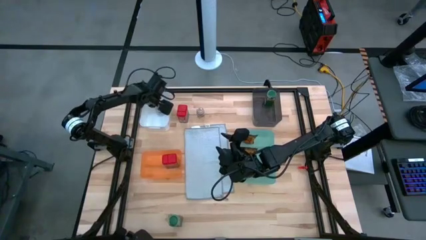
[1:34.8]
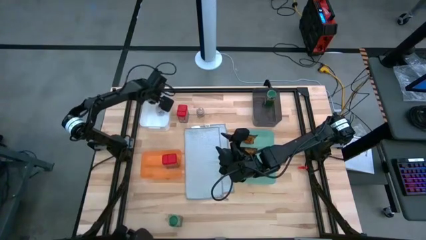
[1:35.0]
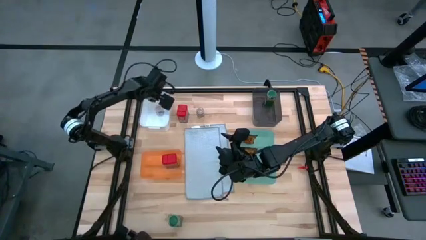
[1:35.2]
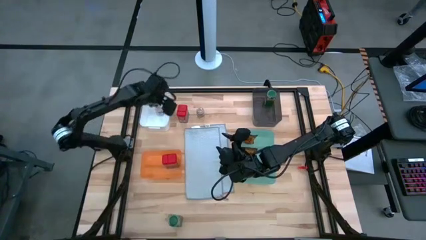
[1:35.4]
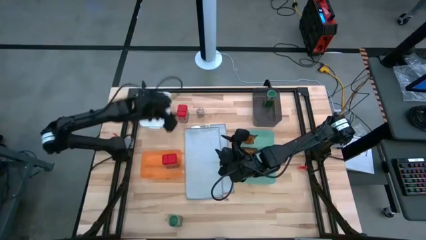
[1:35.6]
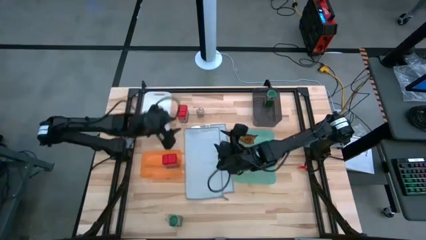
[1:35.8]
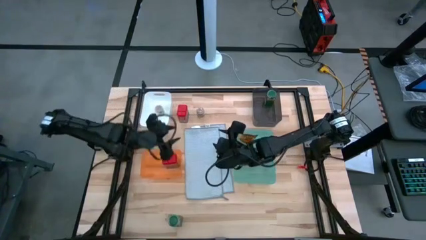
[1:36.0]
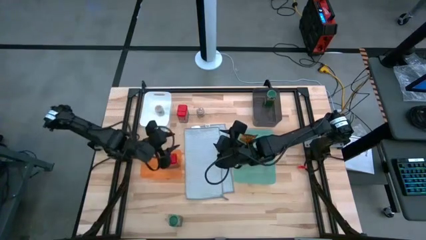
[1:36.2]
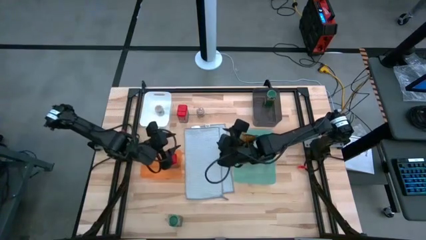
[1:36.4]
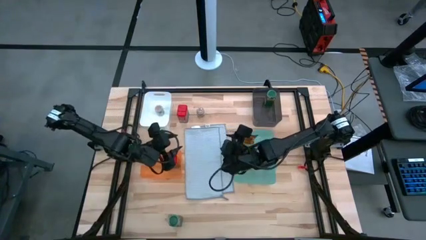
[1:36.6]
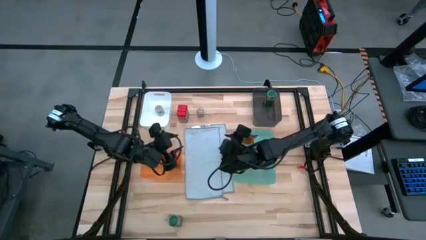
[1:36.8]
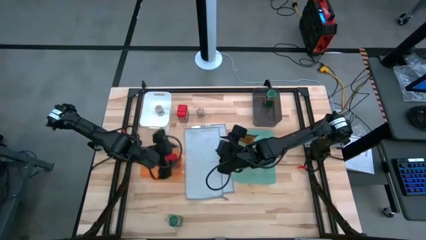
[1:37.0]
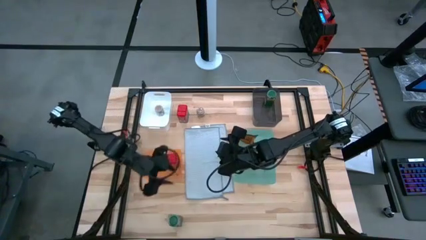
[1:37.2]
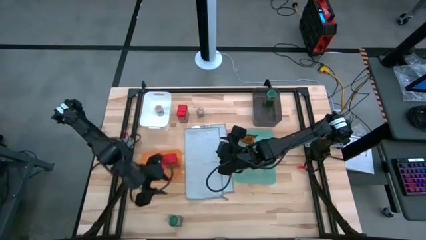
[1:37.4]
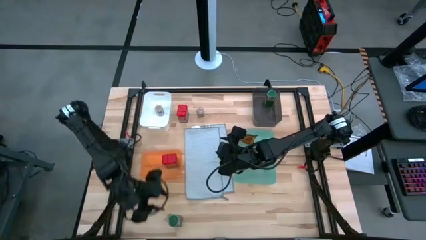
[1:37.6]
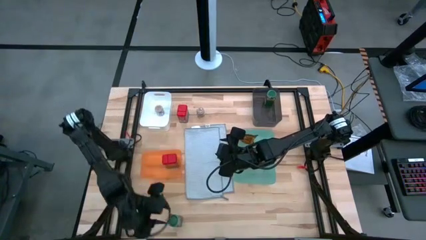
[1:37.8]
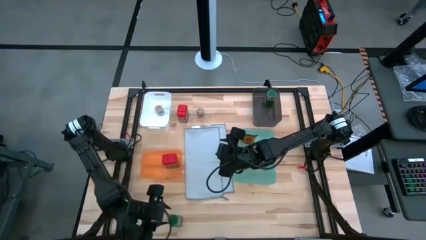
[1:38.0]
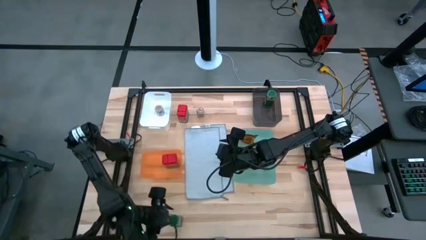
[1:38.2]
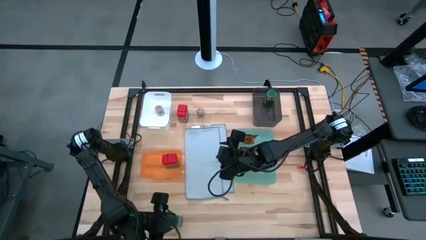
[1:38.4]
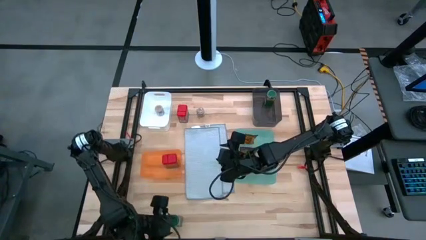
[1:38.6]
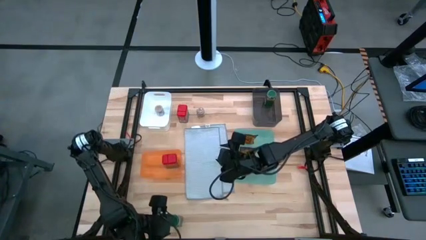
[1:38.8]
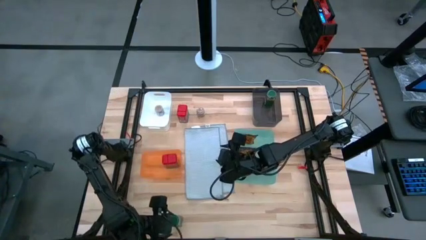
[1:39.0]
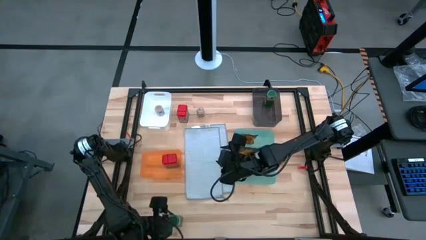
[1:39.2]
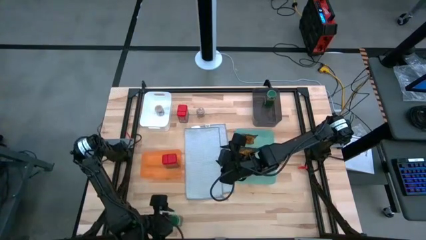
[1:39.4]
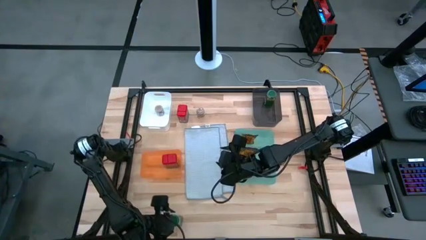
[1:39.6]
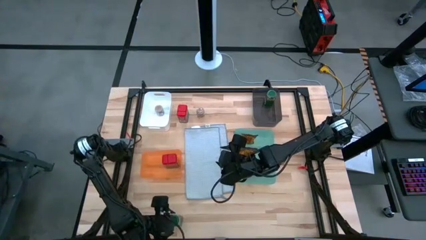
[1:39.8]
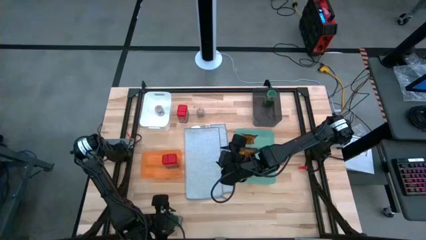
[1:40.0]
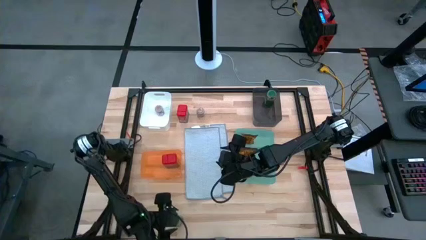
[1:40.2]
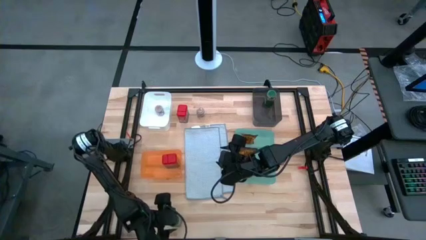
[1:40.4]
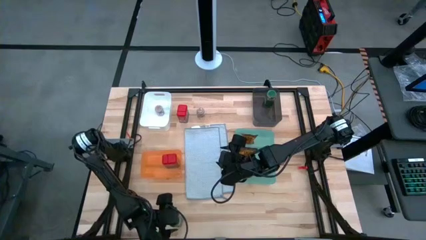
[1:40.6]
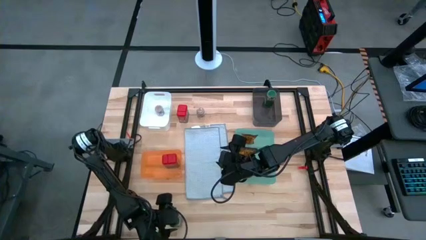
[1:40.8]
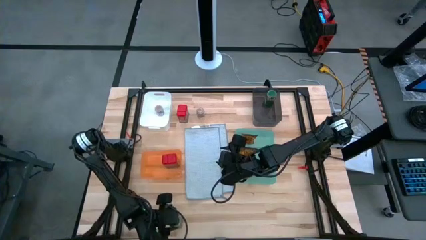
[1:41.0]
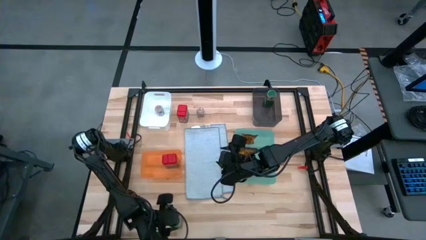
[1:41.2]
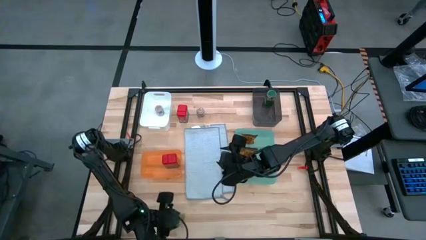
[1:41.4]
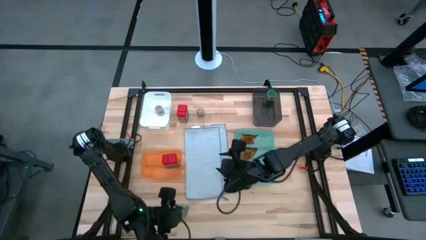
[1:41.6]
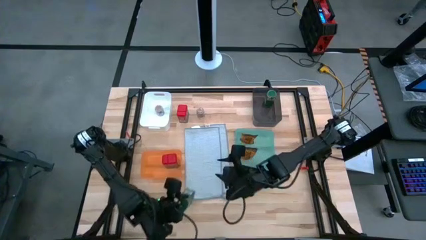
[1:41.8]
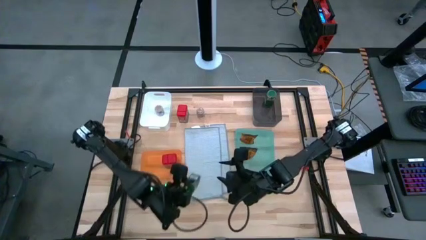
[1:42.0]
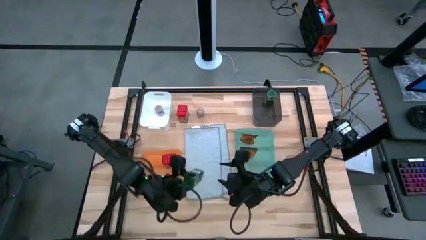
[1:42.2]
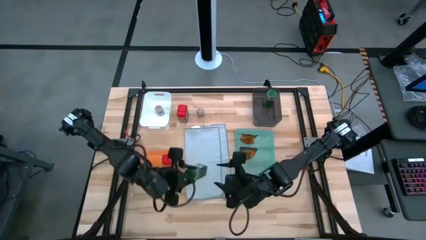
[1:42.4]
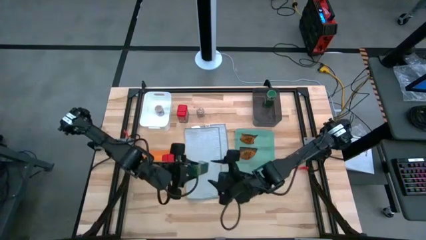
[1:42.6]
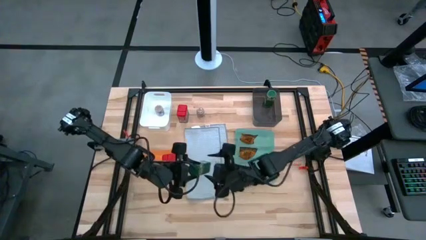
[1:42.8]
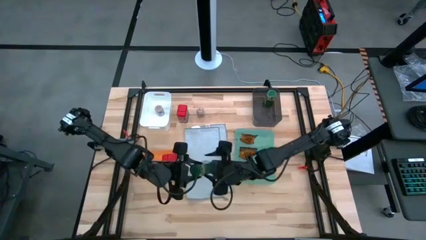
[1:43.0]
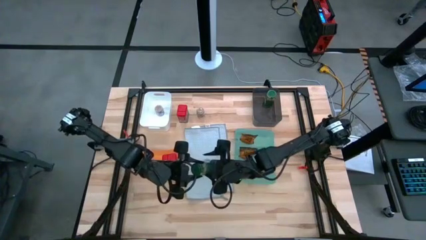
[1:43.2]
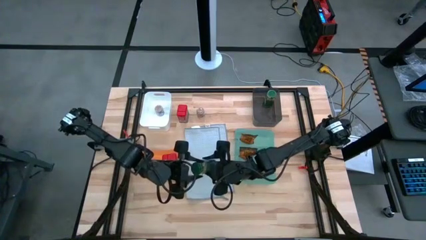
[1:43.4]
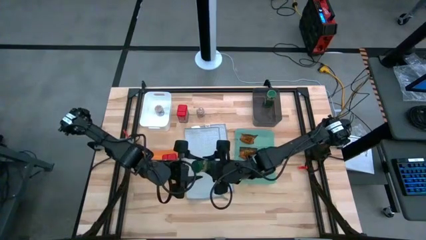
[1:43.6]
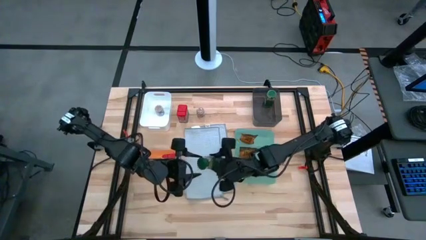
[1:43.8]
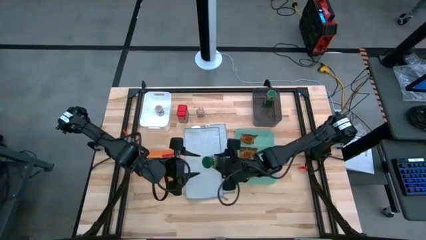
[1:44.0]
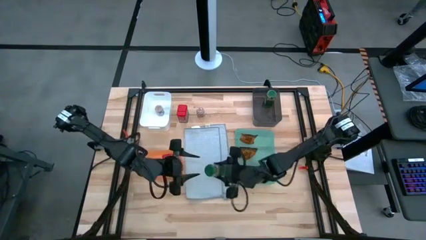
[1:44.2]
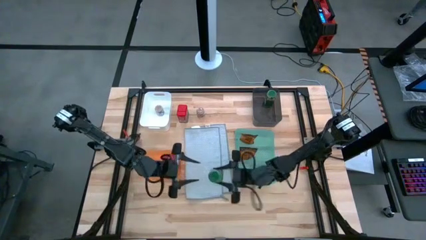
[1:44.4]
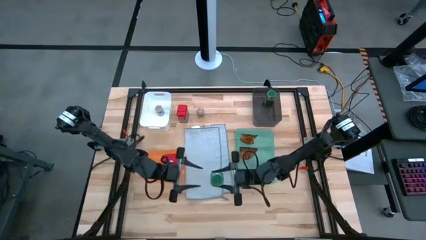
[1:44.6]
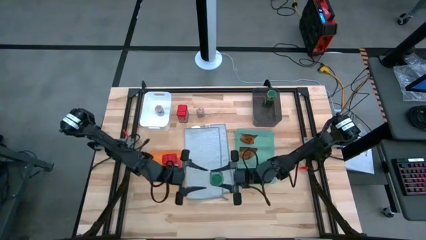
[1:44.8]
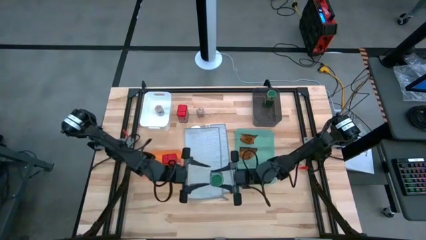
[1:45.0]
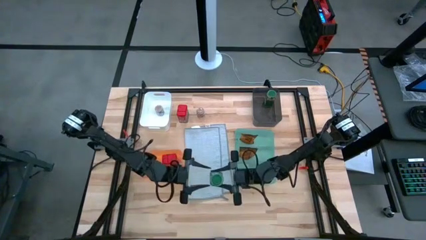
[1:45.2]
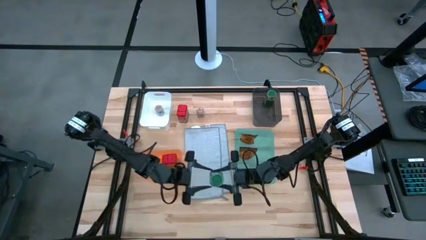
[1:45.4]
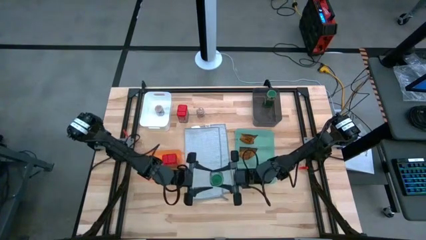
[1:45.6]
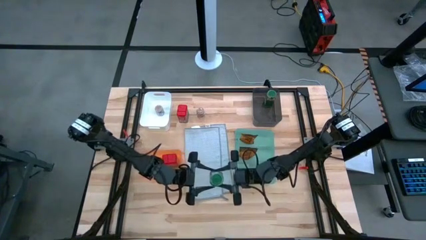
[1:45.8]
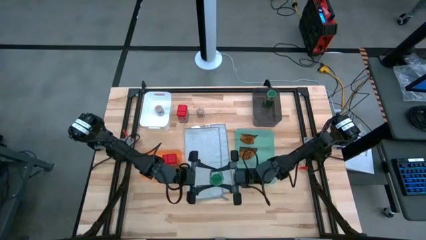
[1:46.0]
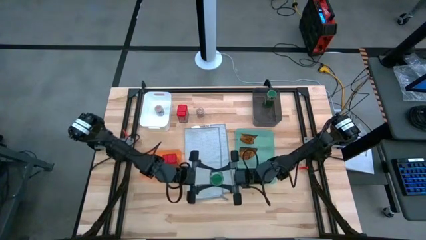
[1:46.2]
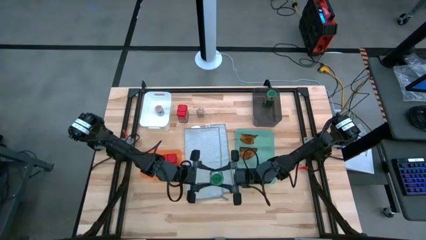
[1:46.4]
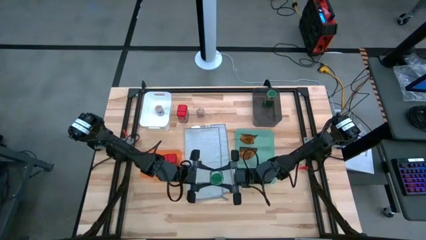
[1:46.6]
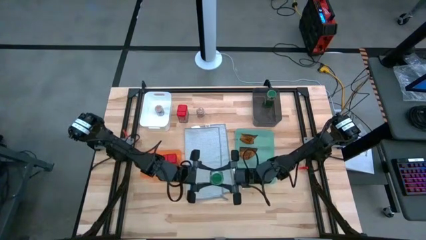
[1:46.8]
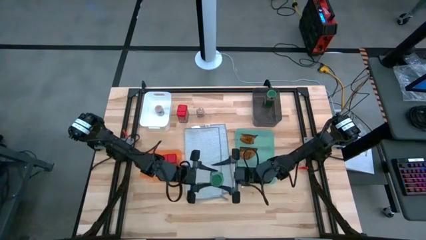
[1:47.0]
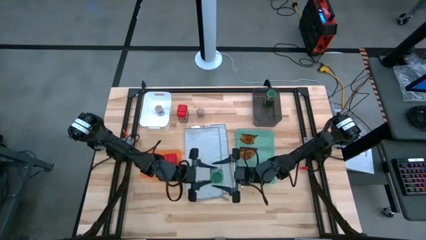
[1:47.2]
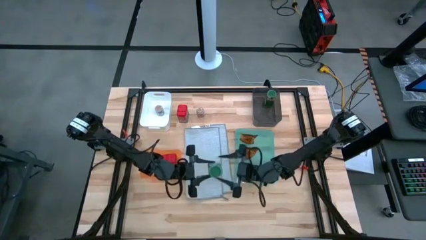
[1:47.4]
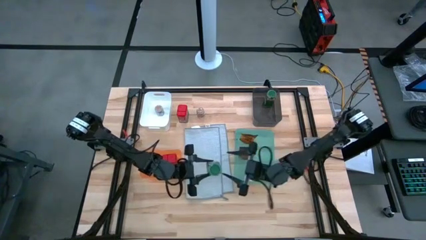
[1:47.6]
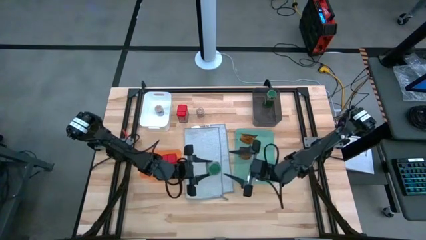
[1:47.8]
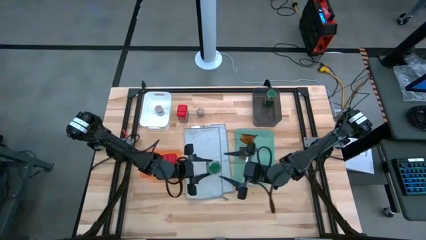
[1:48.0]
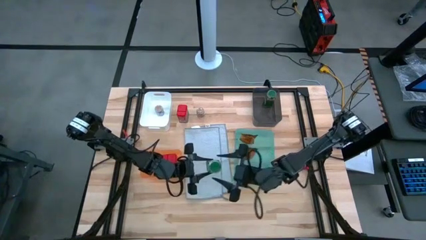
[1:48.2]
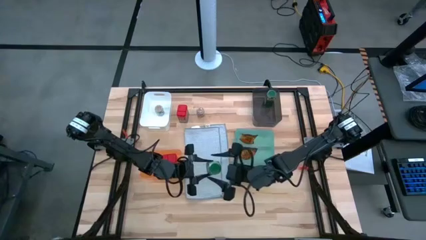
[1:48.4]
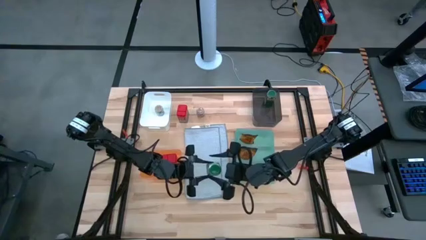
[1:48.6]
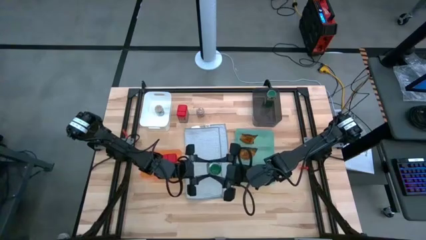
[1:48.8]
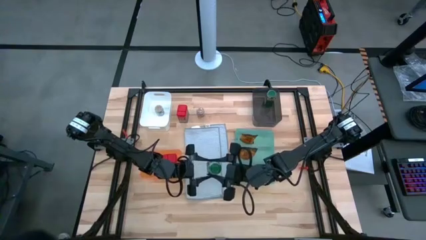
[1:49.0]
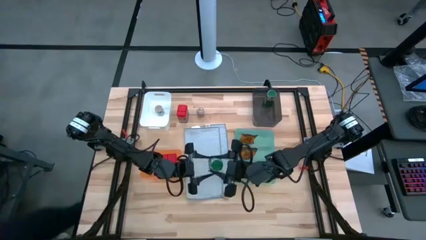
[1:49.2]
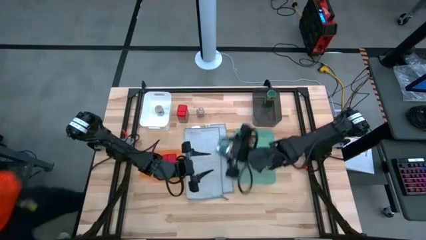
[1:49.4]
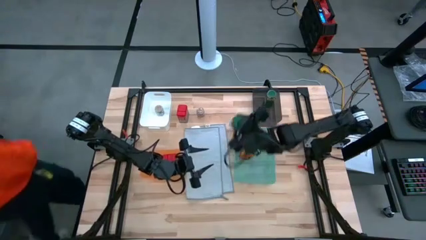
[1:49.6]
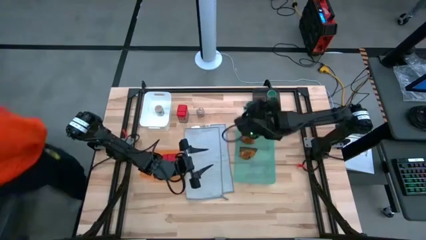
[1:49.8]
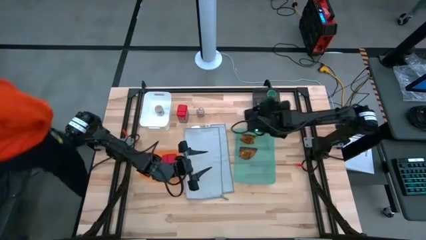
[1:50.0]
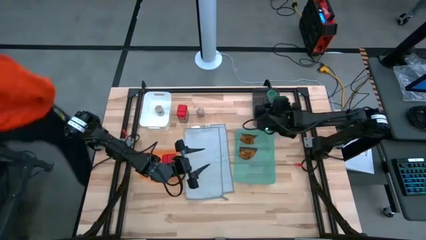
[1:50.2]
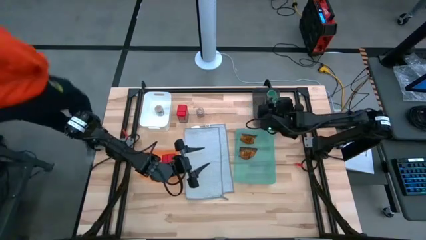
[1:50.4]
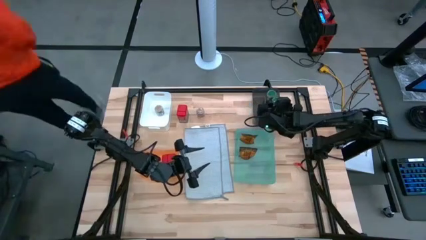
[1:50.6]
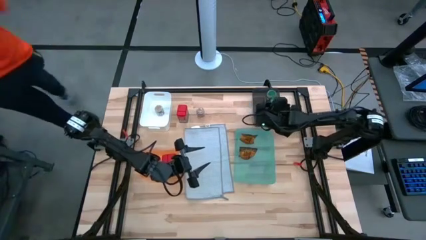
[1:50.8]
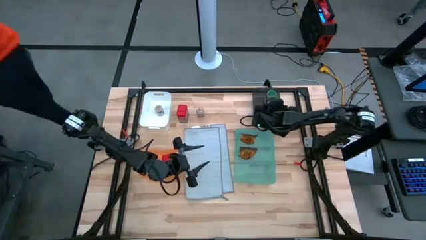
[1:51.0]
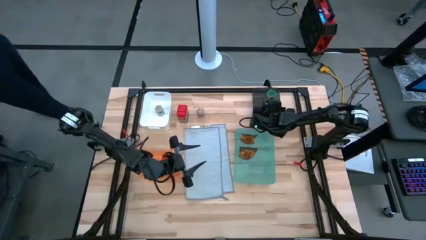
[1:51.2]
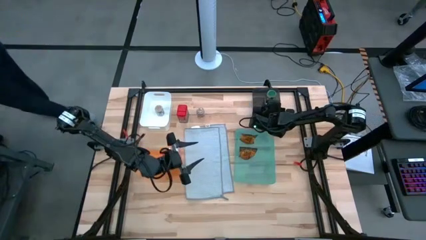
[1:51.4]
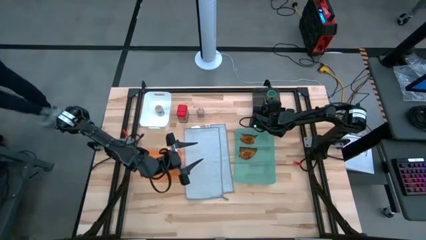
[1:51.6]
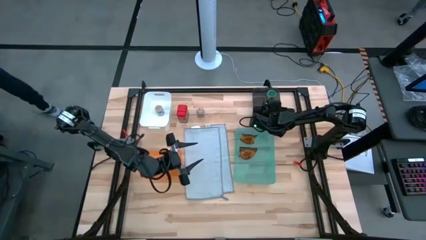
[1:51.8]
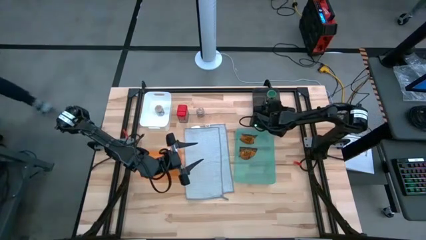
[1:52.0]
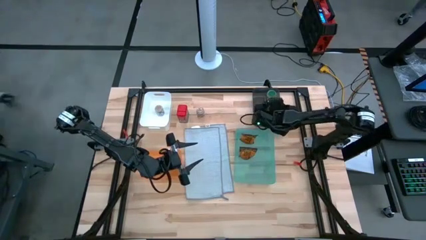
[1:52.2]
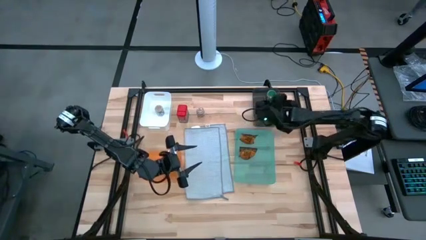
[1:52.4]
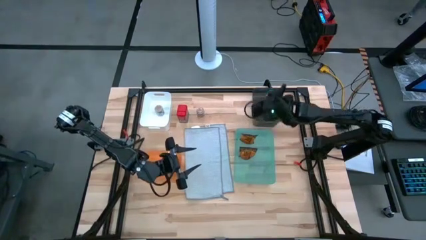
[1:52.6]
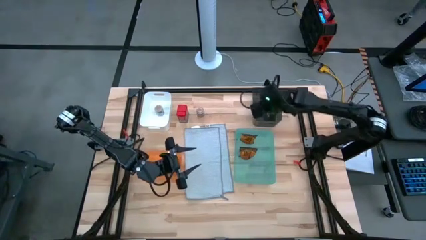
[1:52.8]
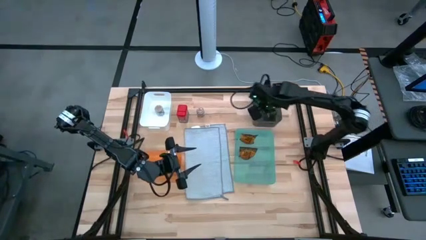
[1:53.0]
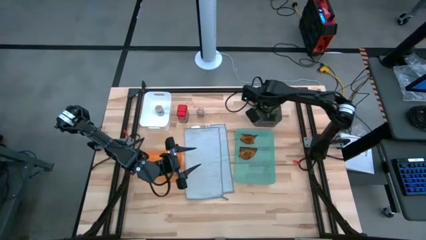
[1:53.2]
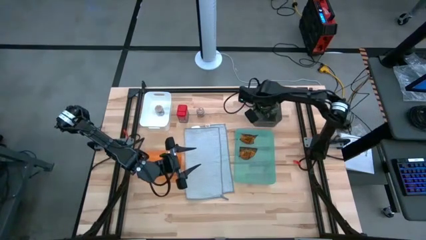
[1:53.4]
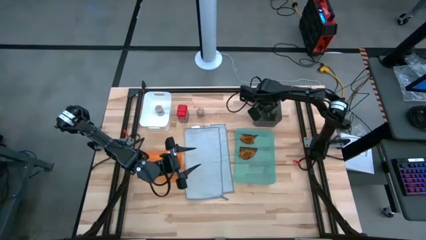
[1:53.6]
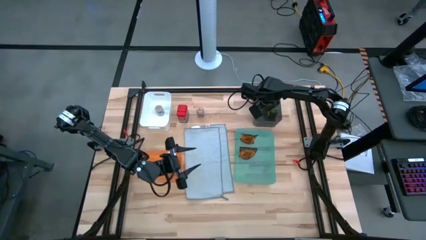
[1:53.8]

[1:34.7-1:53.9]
Task: Sort spices by type
Put the green seasoning bottle into the black bin
